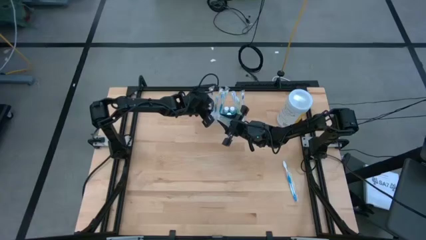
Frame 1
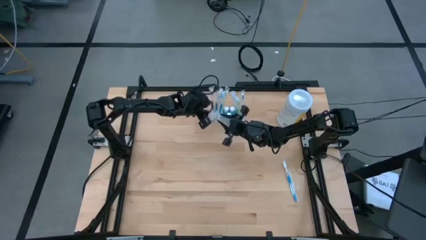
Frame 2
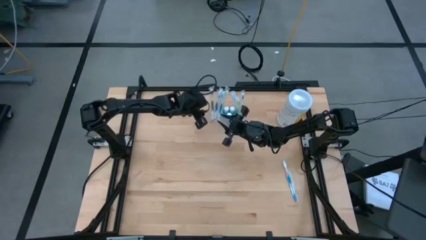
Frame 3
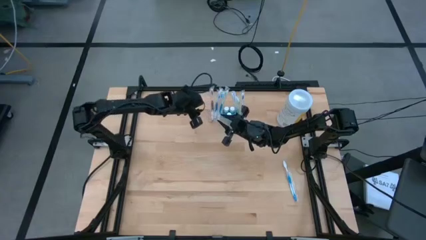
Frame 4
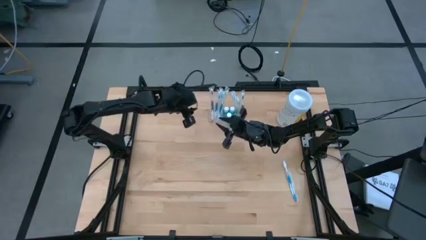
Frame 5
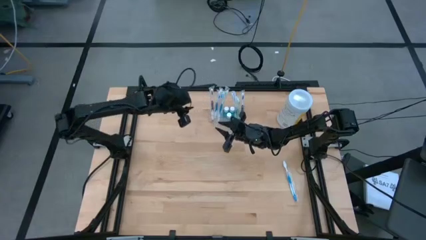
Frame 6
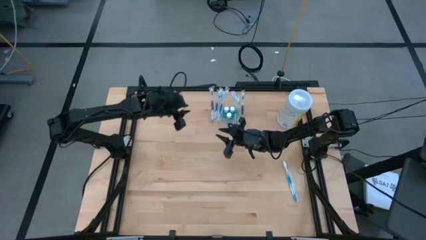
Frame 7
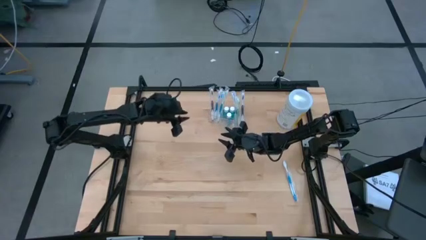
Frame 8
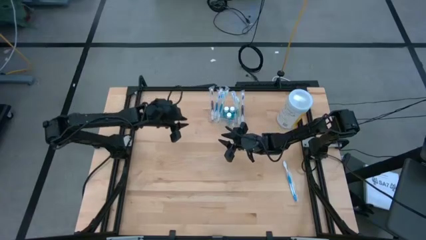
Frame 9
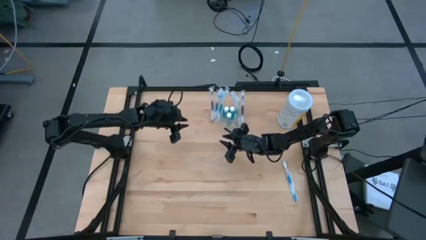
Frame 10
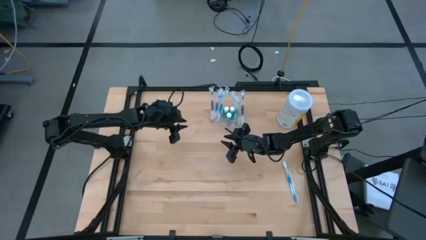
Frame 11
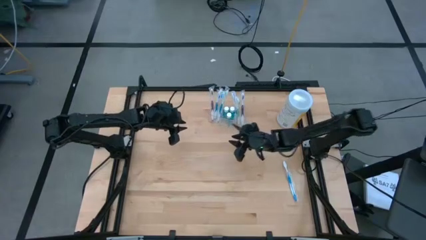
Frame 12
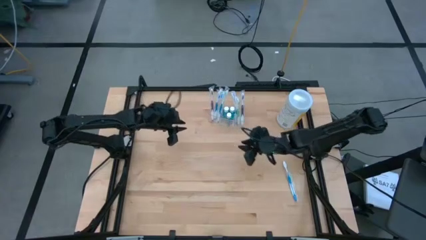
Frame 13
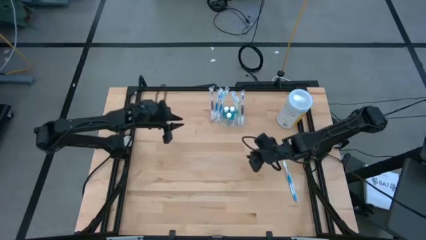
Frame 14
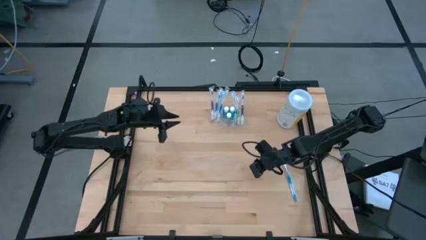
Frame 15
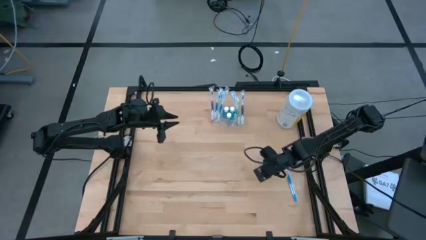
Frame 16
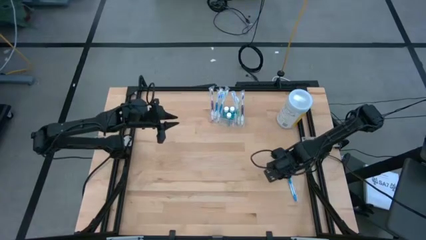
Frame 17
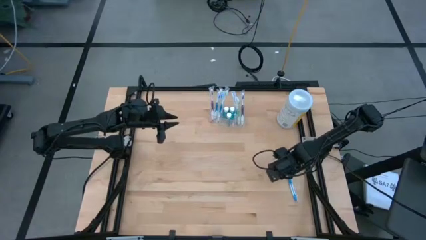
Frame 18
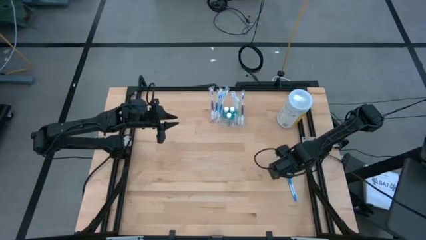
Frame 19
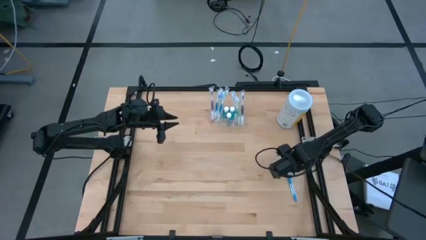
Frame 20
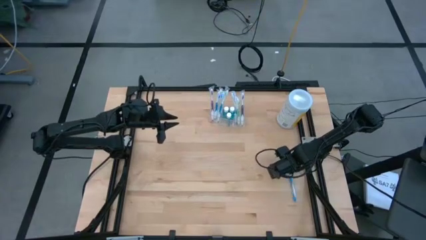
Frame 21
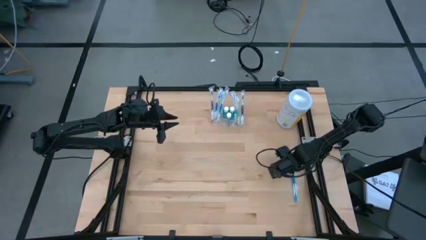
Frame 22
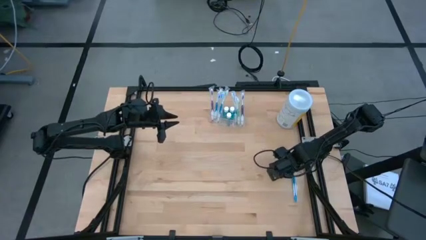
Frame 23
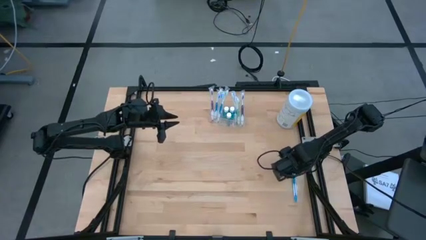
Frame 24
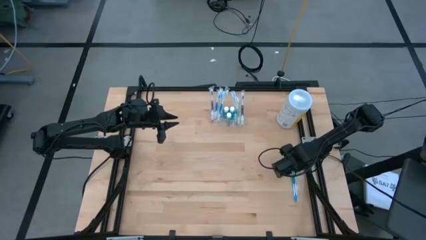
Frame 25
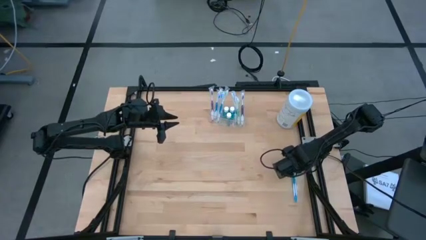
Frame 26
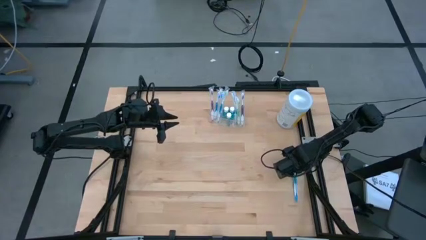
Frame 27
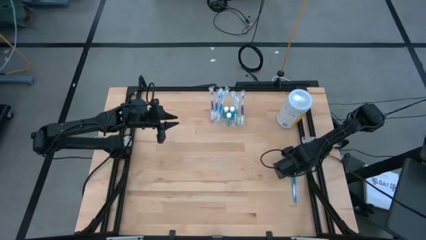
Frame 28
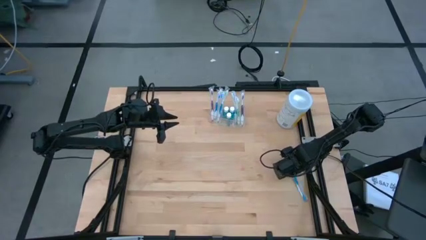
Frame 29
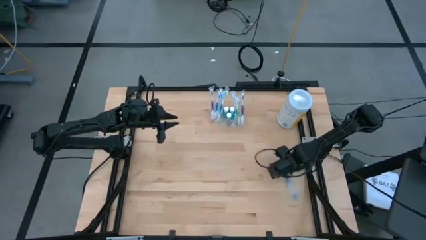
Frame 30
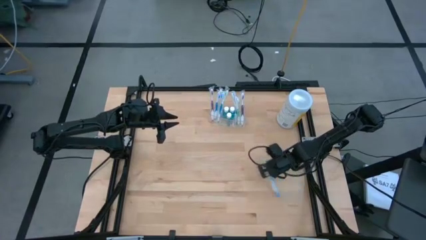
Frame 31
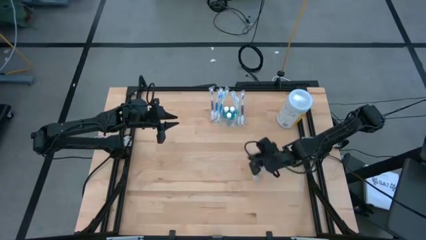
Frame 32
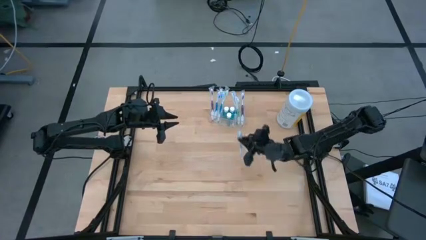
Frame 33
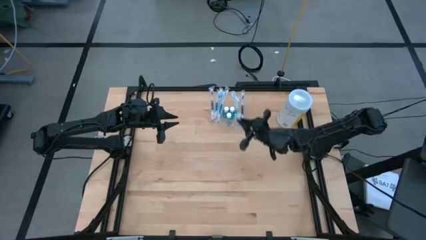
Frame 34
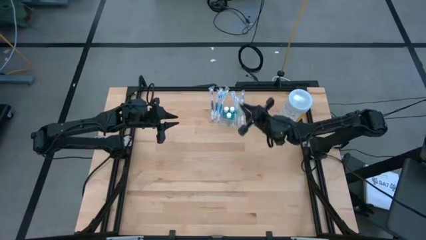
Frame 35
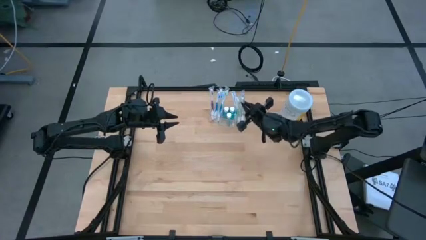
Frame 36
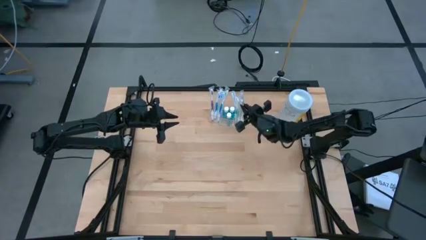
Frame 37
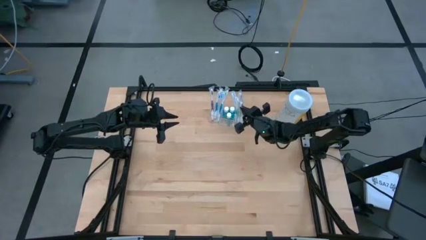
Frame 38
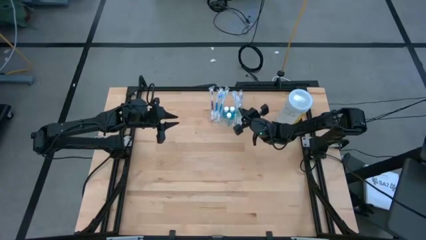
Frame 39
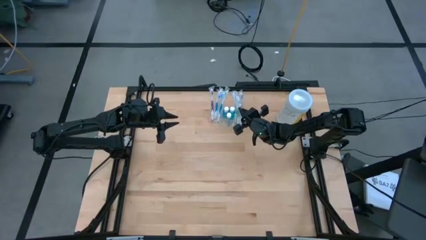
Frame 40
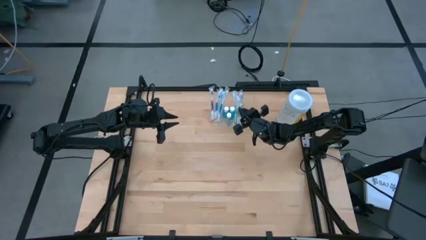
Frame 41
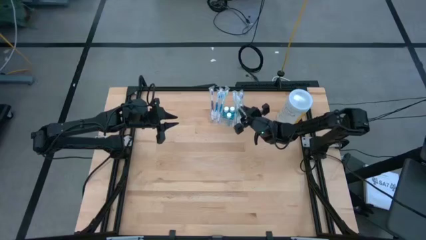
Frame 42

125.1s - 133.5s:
Task: Pick & Place toothbrushing station
Put the blue toothbrush into the right section of the transparent organizer

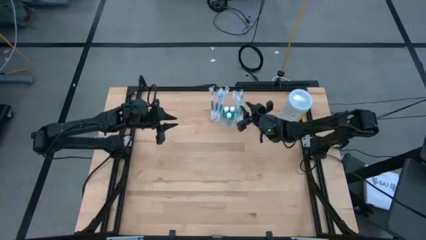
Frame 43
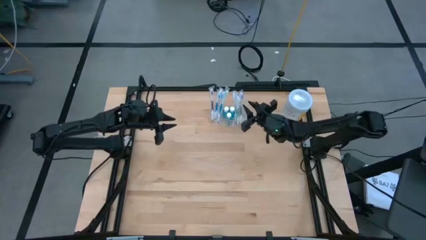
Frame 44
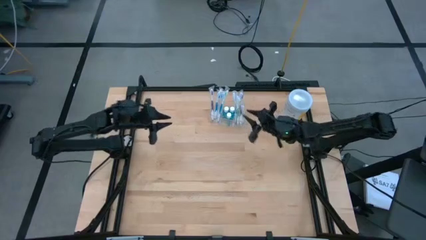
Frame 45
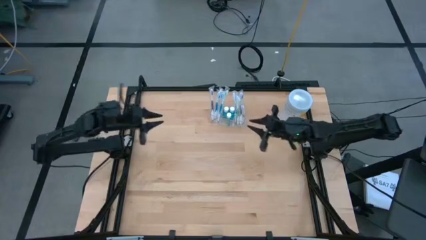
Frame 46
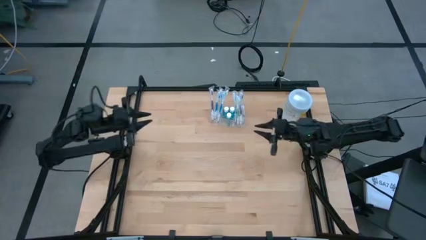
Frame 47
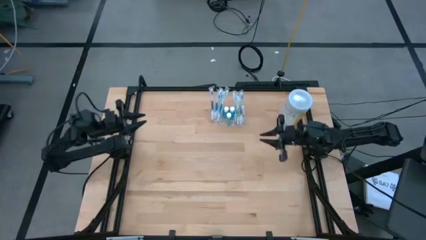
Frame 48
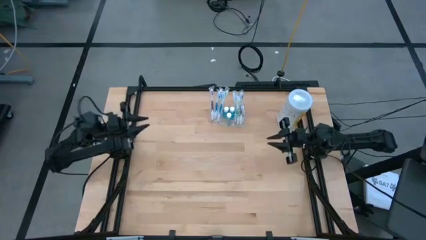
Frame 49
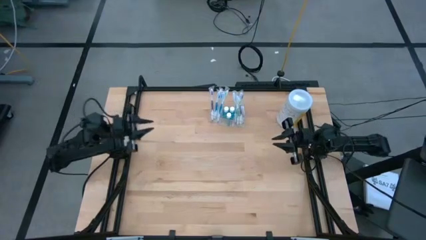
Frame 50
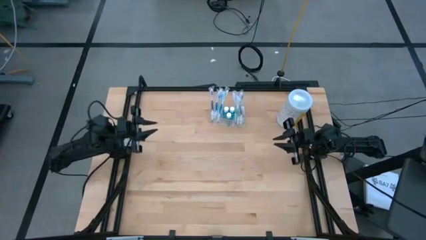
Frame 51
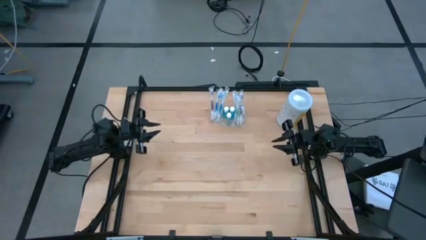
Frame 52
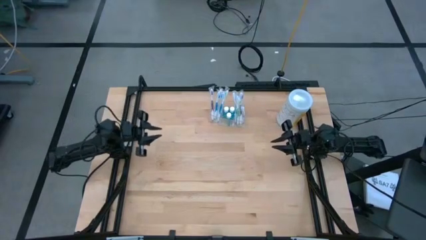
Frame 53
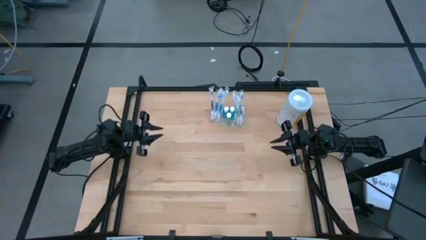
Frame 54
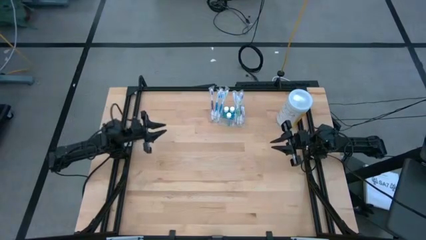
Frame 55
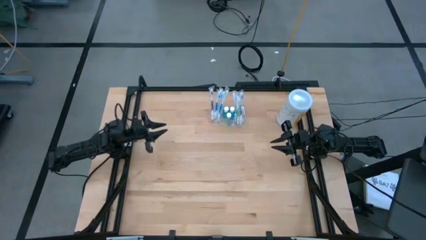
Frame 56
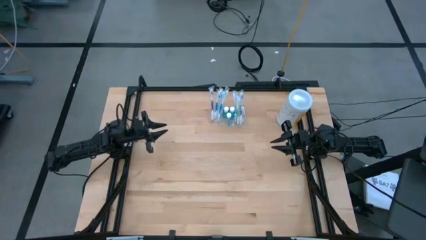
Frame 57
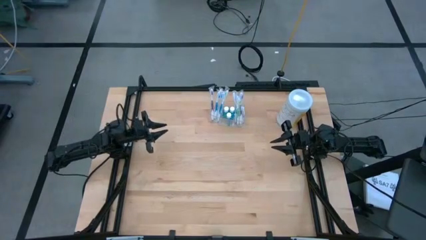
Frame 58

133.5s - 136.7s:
Return to Home Position
